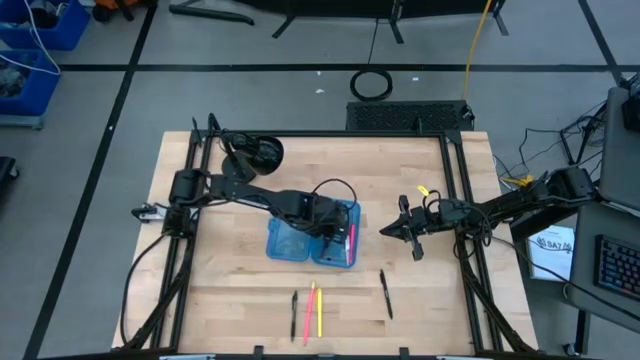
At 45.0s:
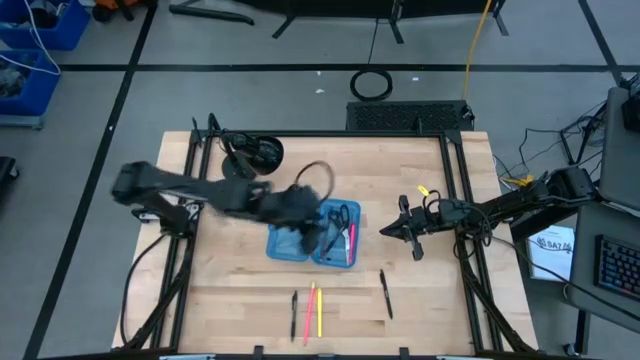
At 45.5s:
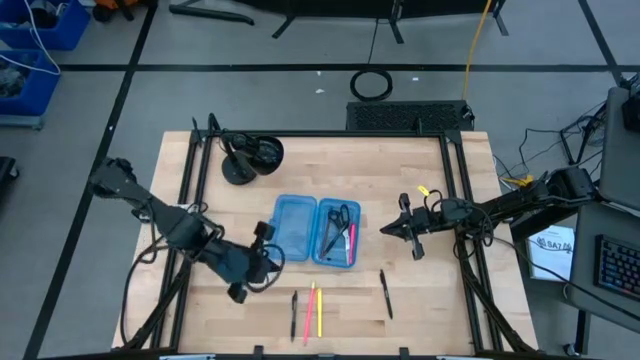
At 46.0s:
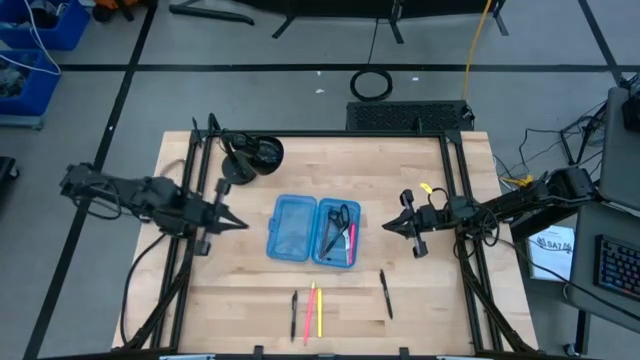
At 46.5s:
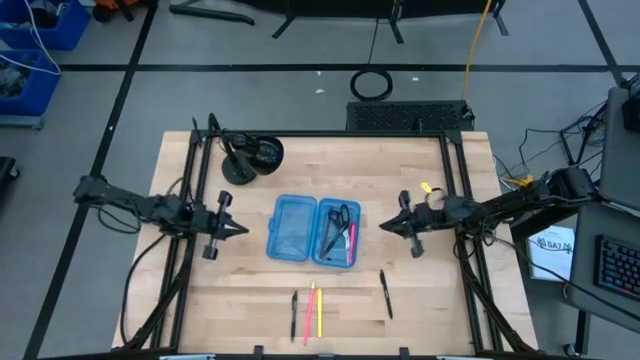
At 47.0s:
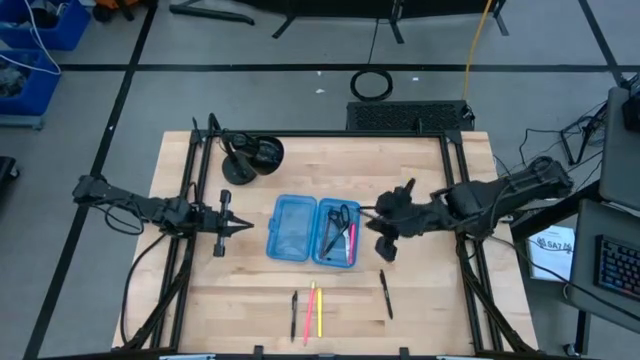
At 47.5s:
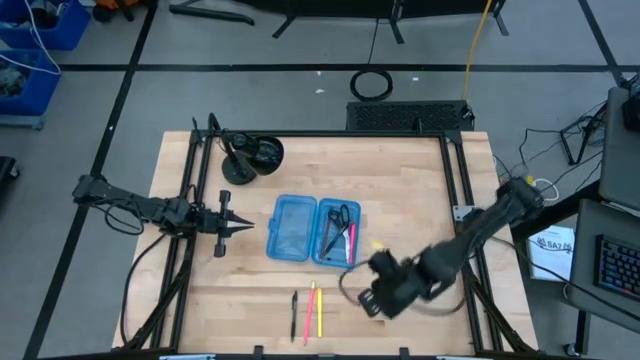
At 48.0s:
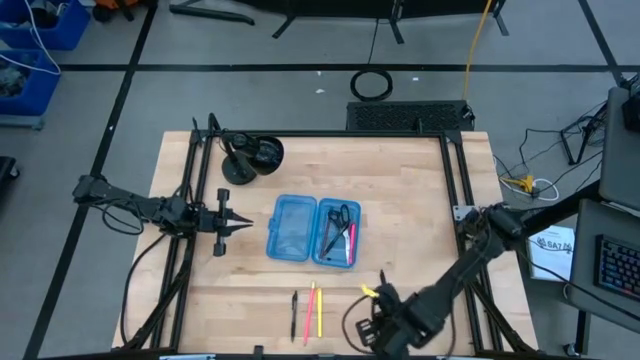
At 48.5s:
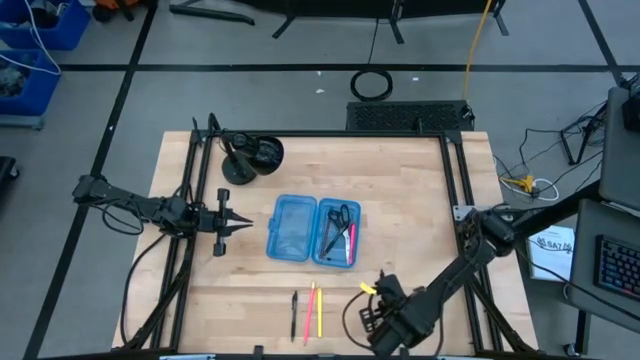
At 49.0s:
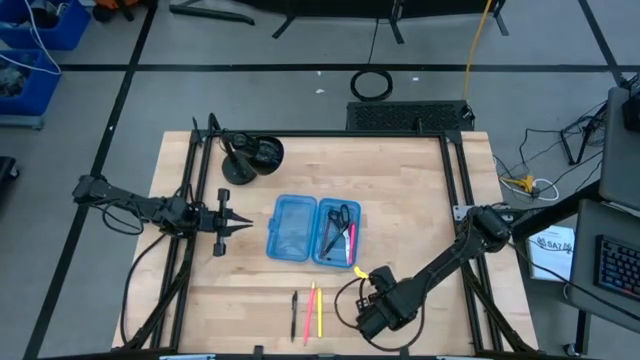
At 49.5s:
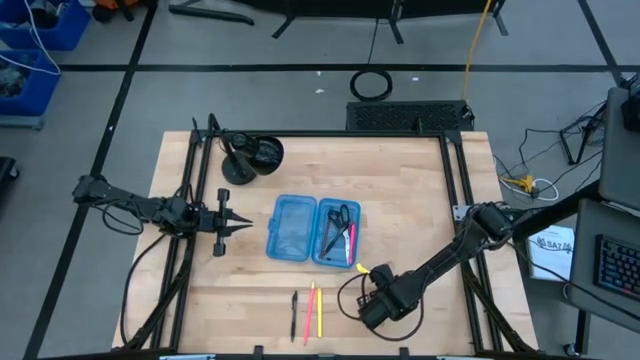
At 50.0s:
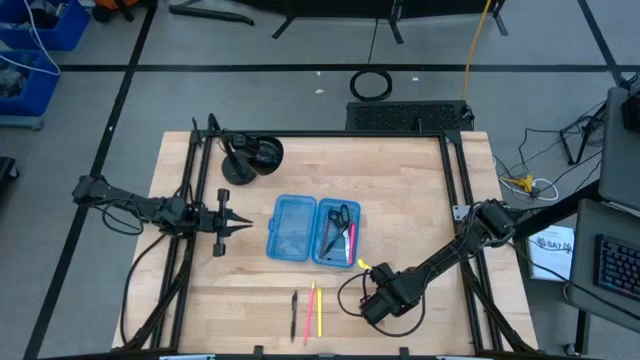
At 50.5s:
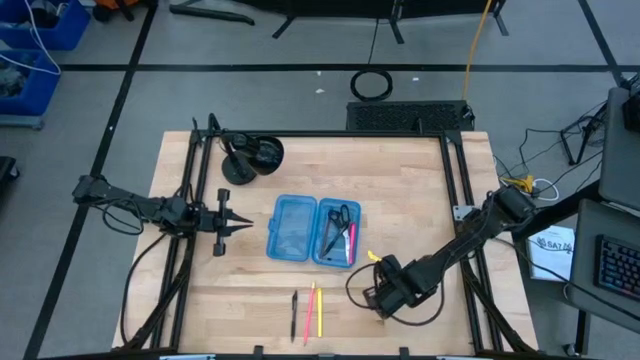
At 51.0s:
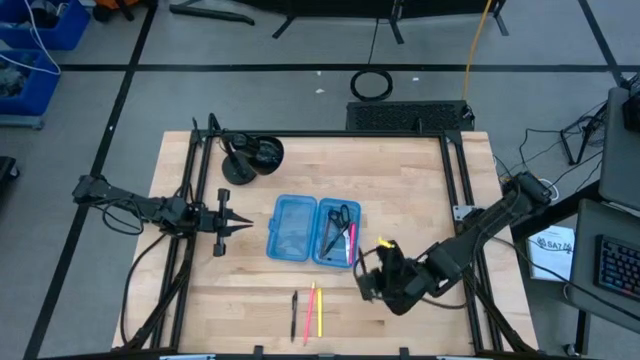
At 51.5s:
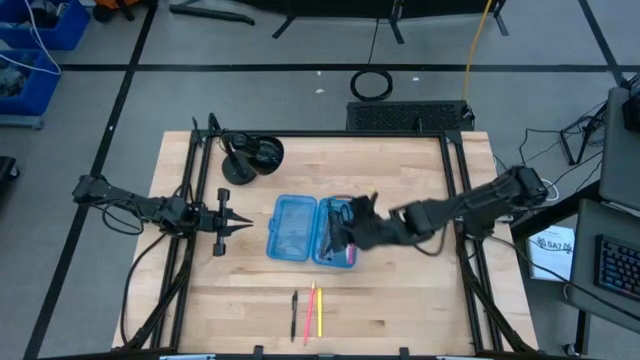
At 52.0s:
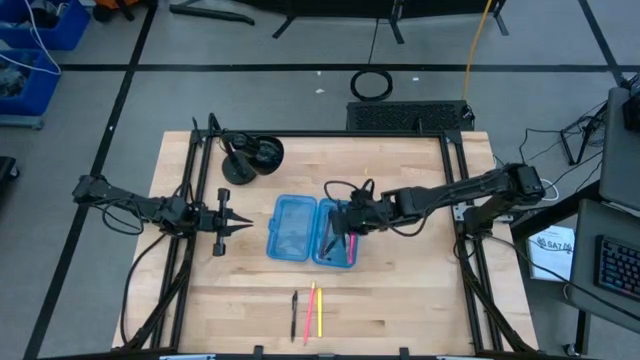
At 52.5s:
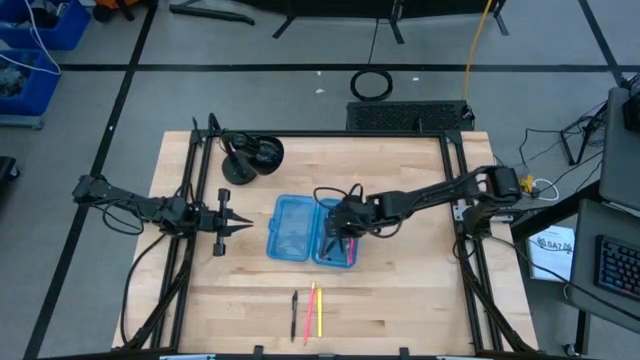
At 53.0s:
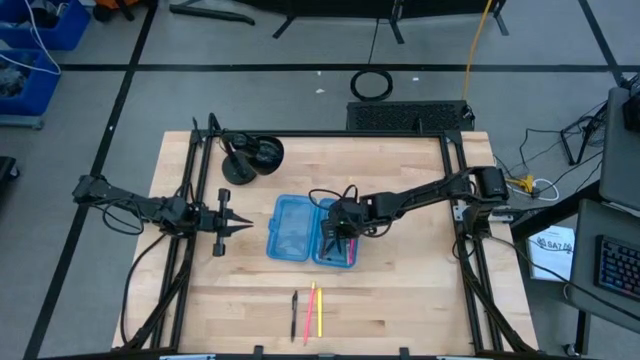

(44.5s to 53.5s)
Task: Pick & place school supplies into a supply box
Put the right black pen into the blue box

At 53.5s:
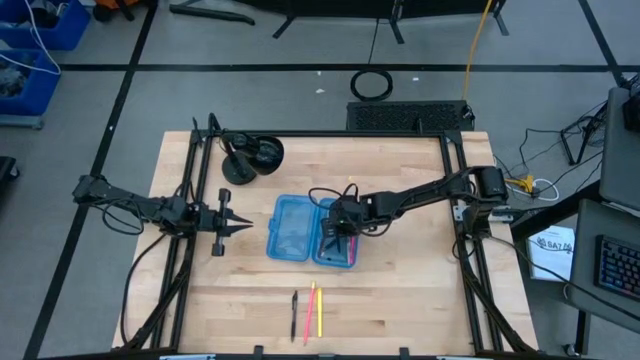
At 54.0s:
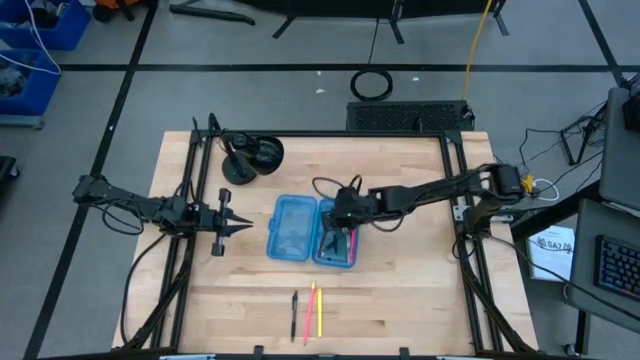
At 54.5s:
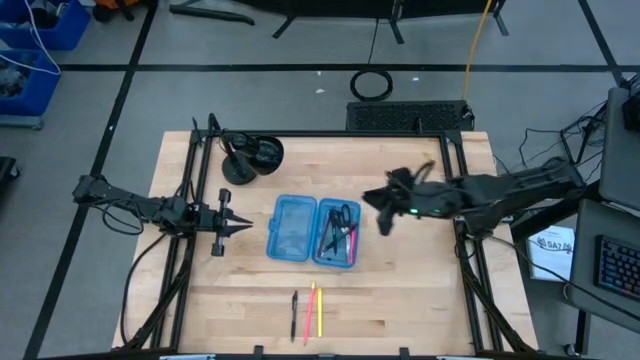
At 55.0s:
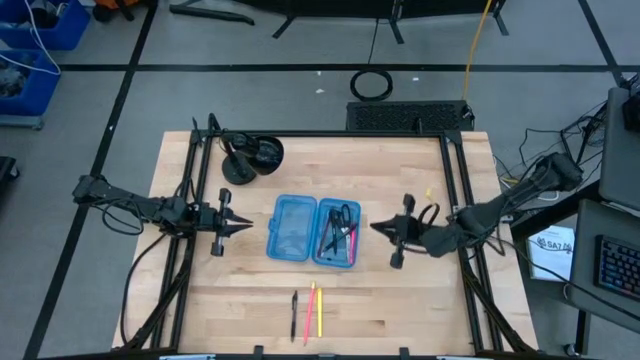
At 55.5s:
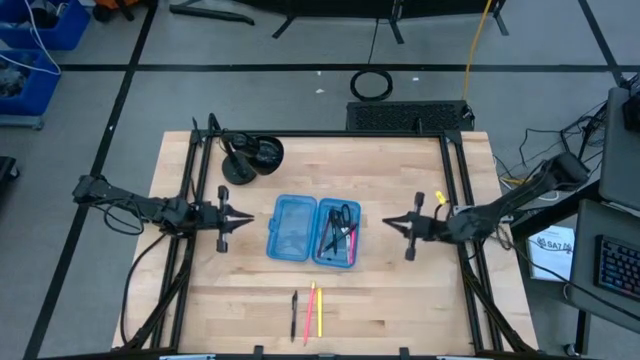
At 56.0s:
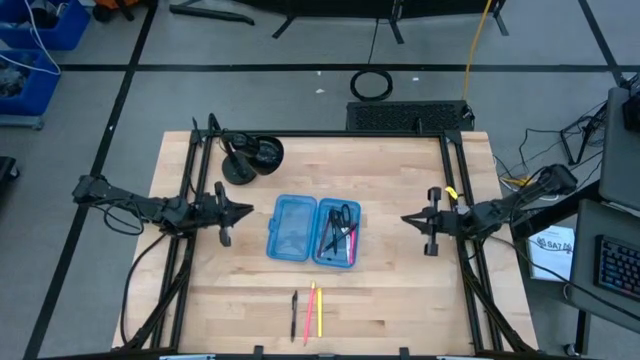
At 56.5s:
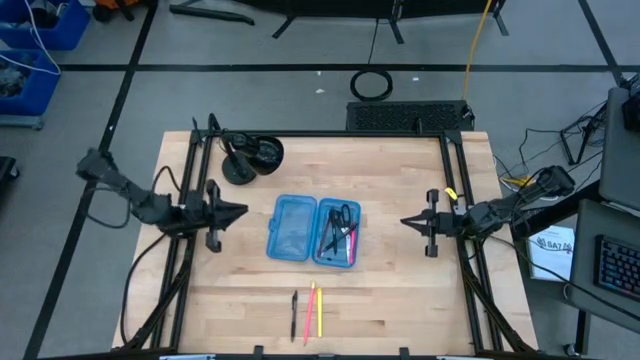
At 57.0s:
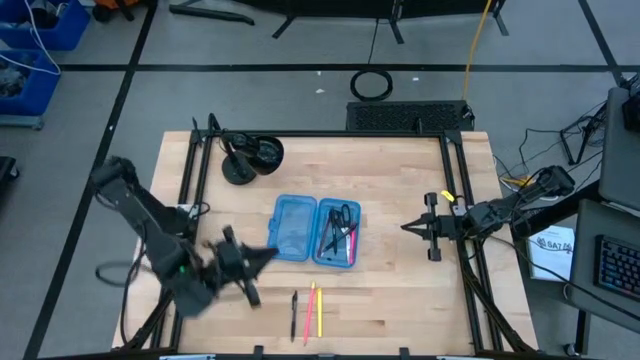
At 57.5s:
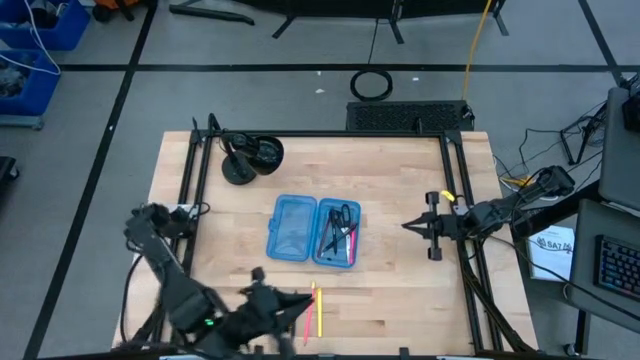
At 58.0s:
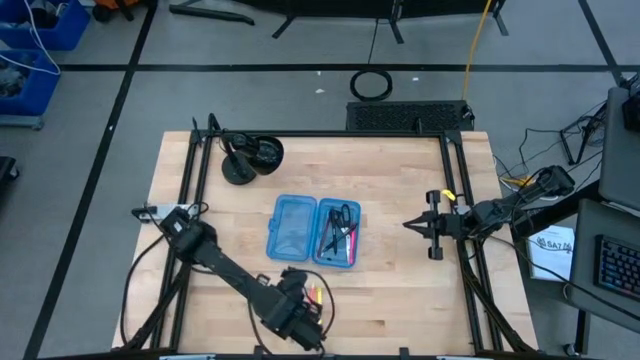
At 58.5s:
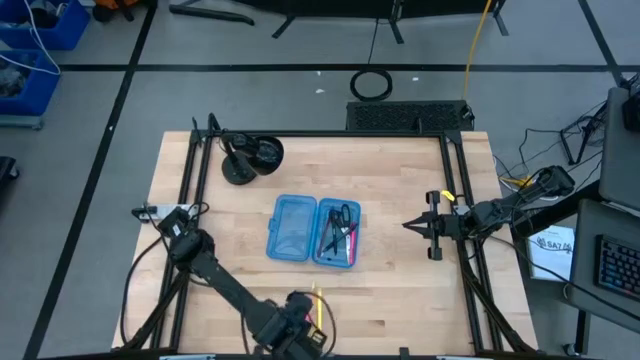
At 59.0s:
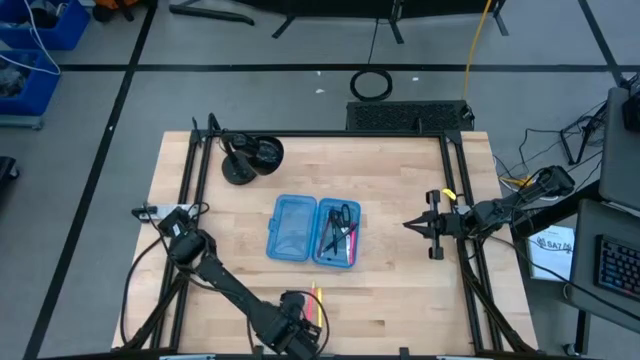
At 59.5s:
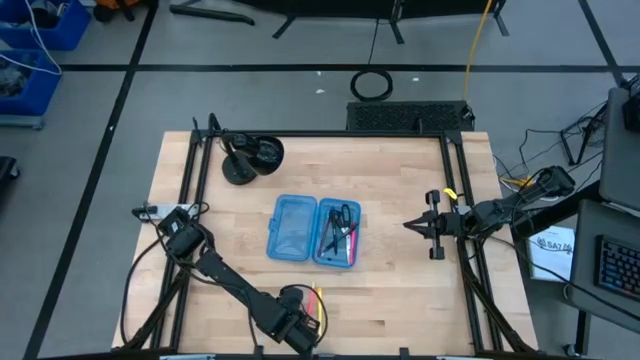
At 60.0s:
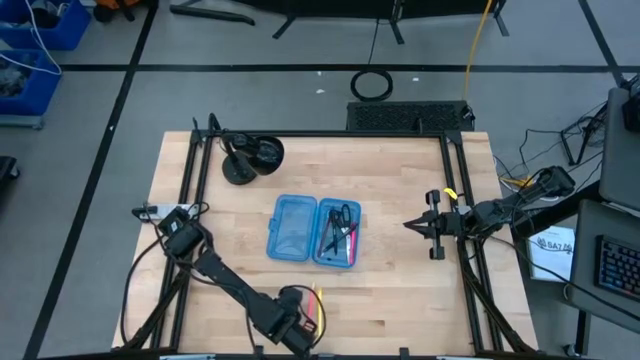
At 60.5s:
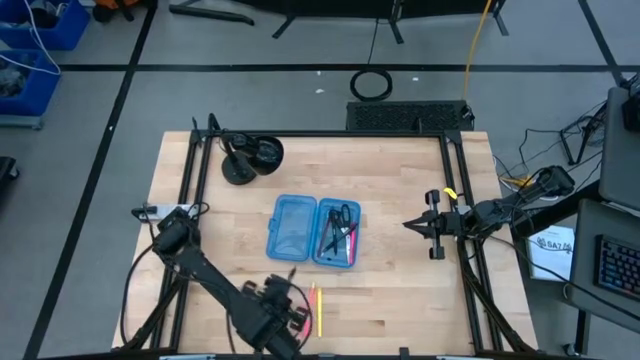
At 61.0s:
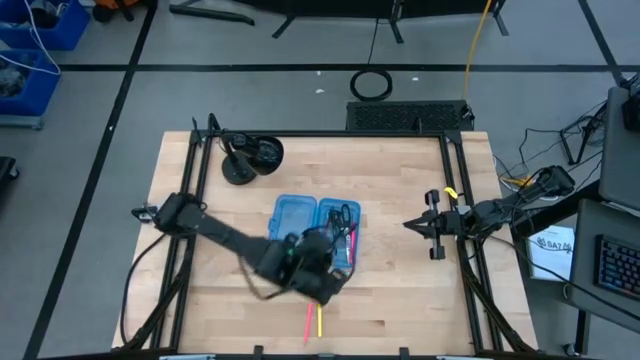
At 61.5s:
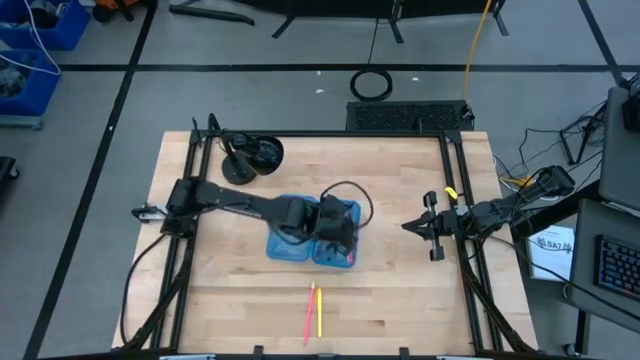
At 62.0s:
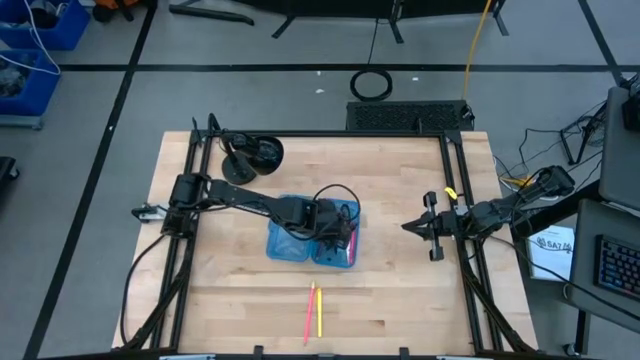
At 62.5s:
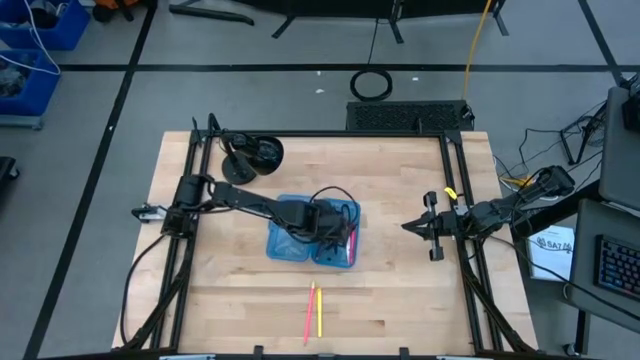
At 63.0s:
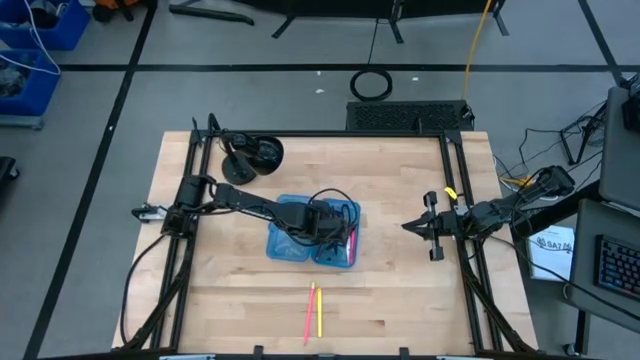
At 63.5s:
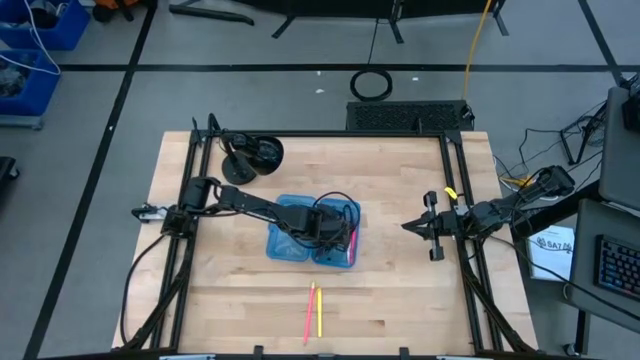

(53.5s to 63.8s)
Put the black pen into the blue box

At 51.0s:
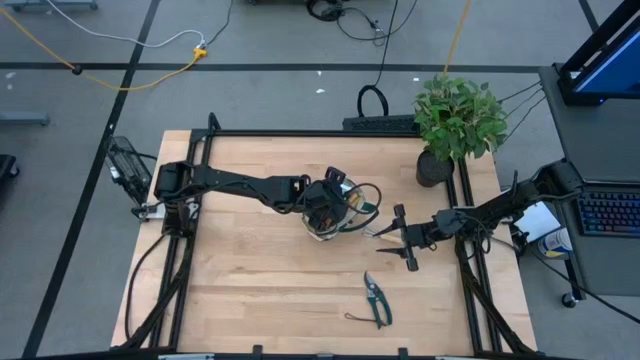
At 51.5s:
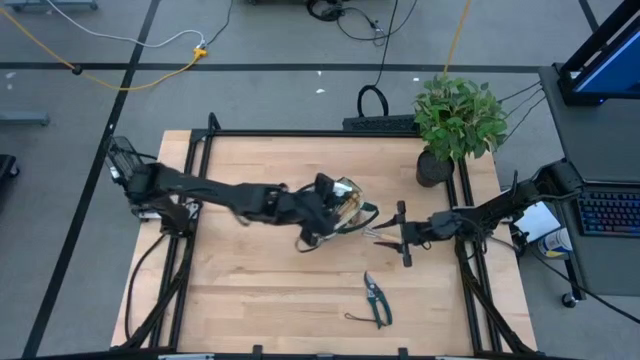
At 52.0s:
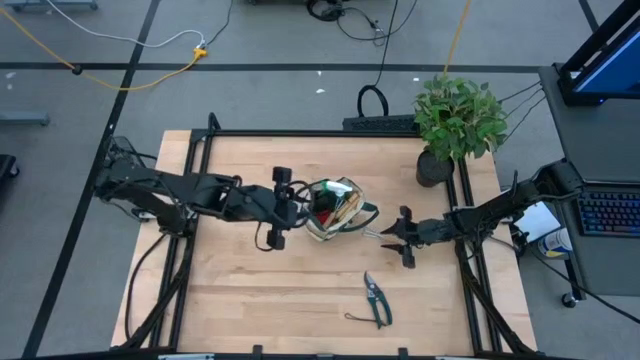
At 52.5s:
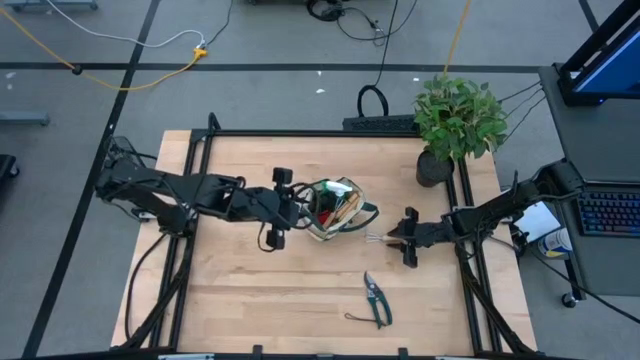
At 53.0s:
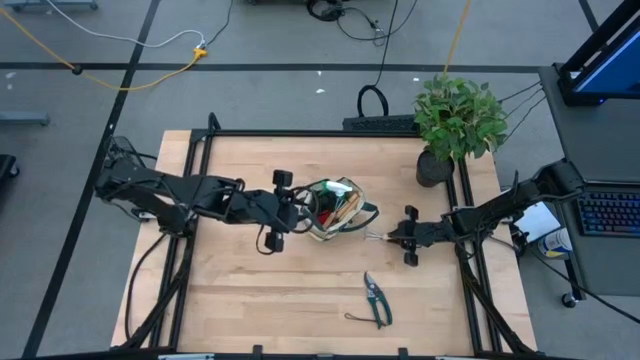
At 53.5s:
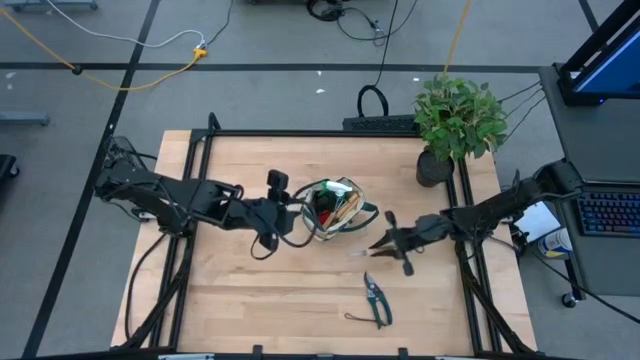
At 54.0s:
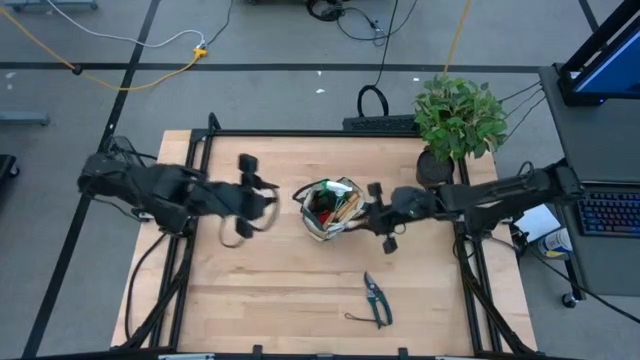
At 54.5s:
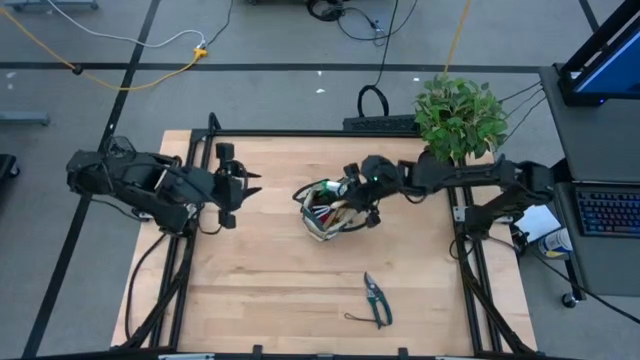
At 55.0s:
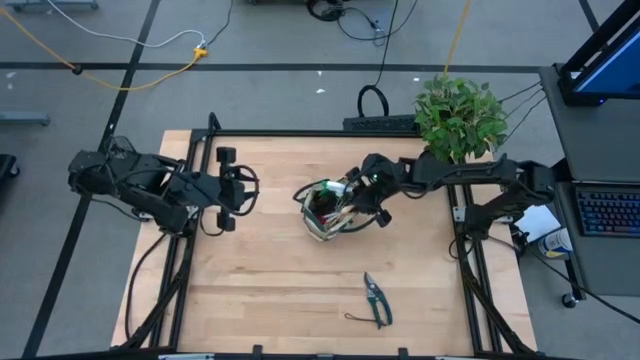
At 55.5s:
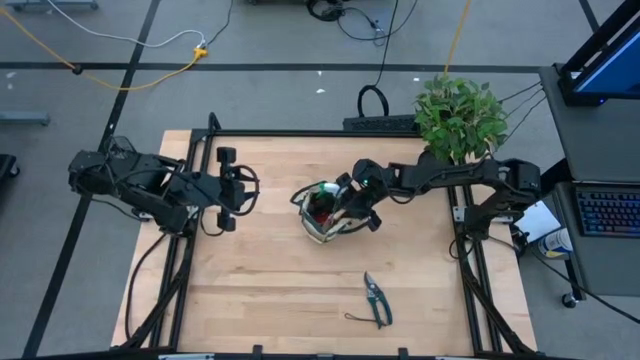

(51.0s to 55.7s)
Task: Pick & Place Garden tools in Gardening bag
Put the brown hand rake into the green gardening bag
